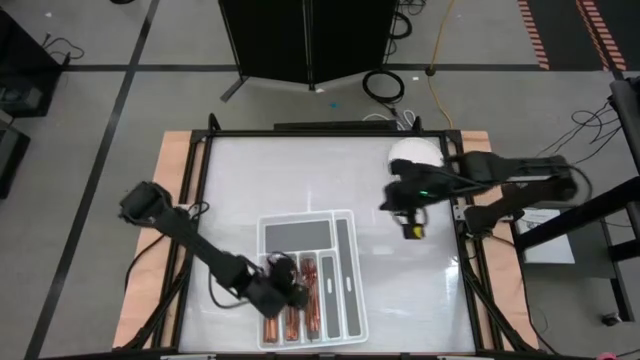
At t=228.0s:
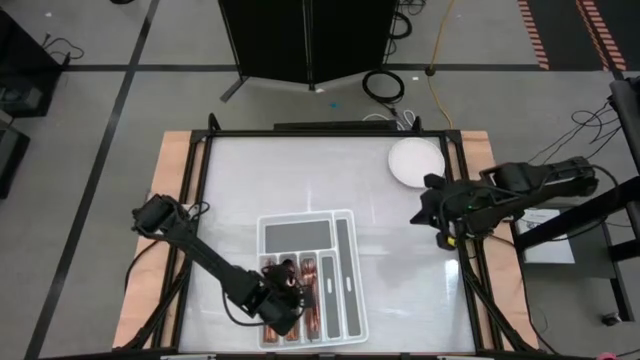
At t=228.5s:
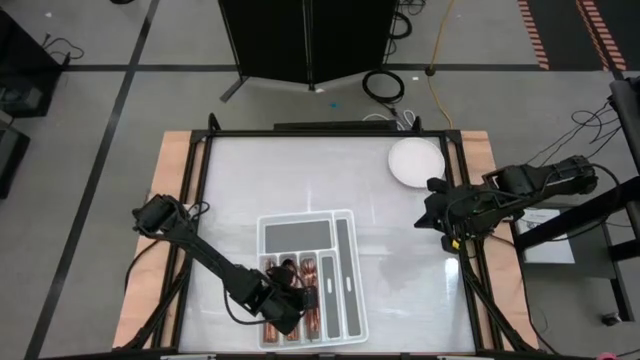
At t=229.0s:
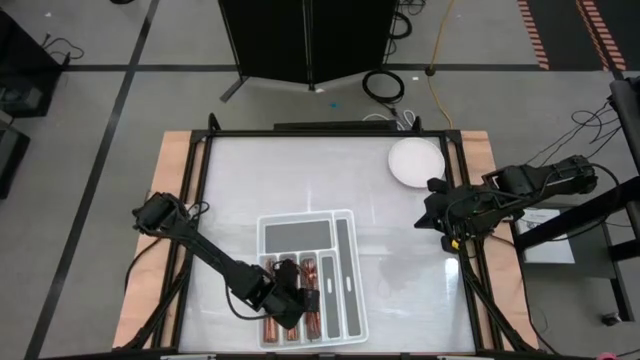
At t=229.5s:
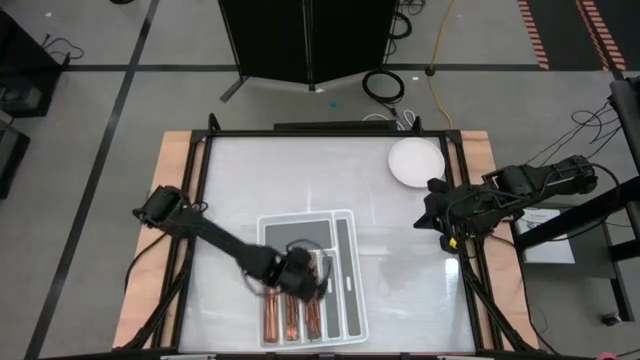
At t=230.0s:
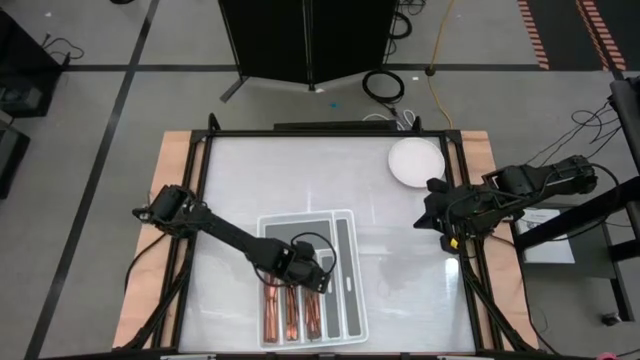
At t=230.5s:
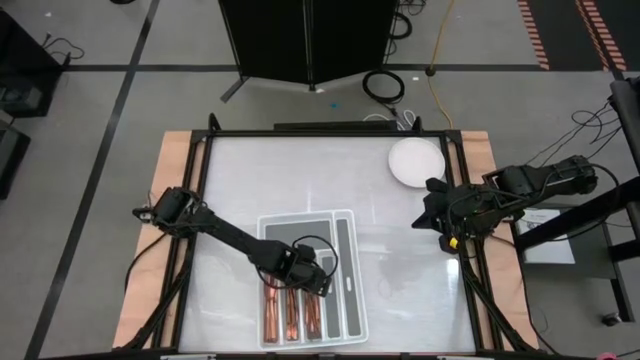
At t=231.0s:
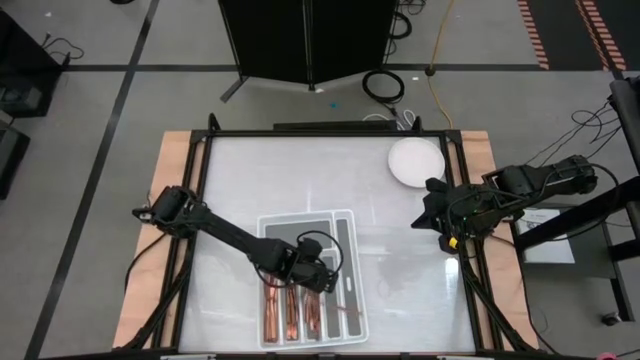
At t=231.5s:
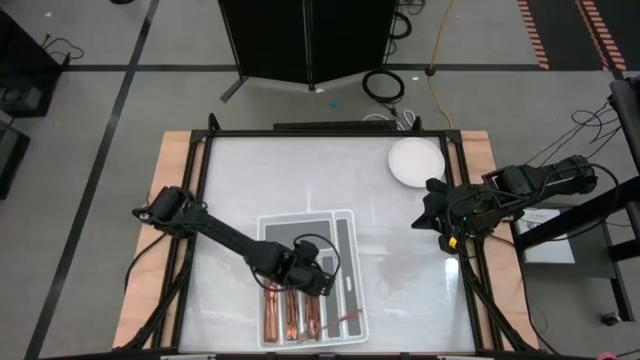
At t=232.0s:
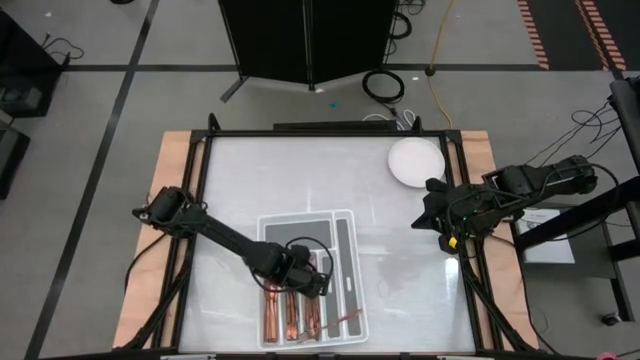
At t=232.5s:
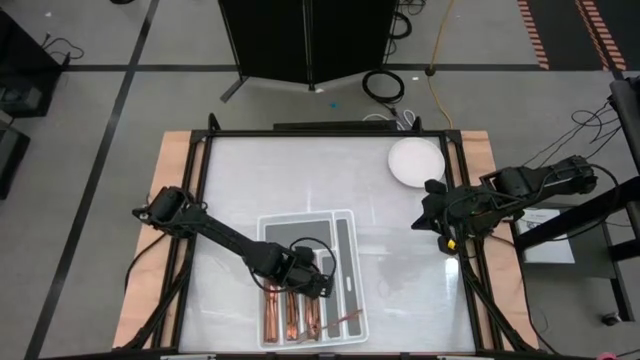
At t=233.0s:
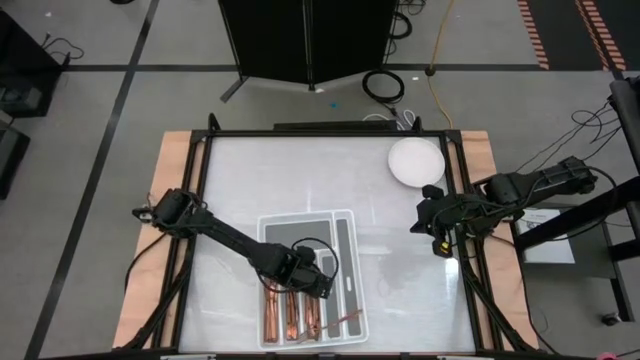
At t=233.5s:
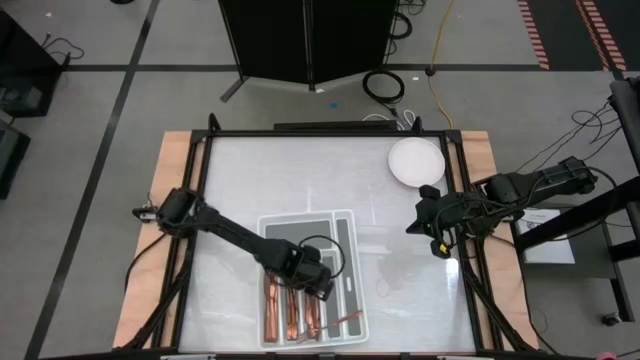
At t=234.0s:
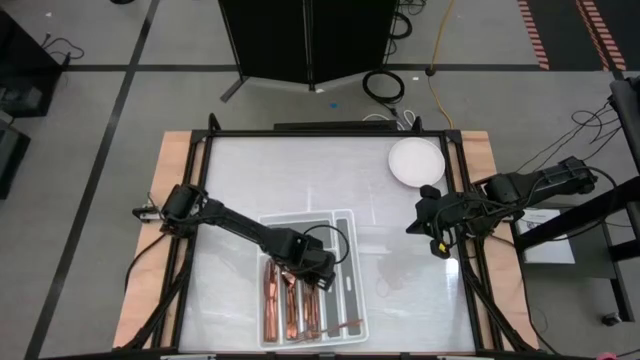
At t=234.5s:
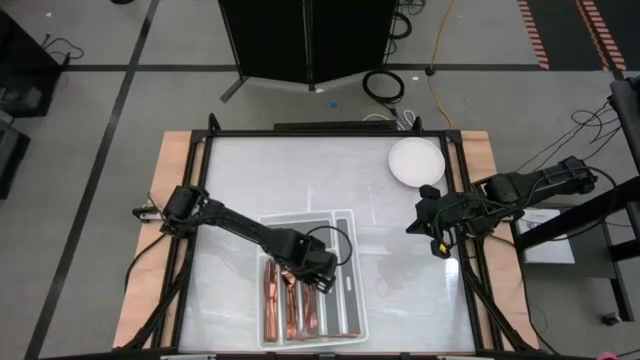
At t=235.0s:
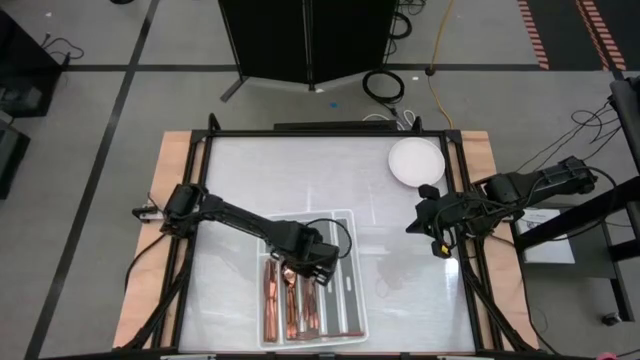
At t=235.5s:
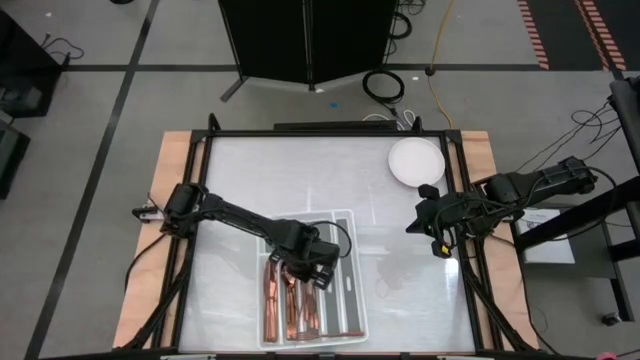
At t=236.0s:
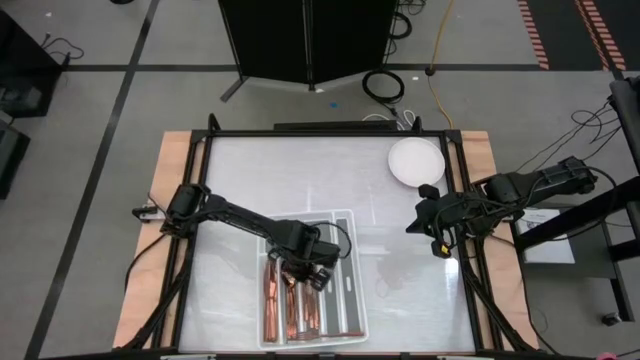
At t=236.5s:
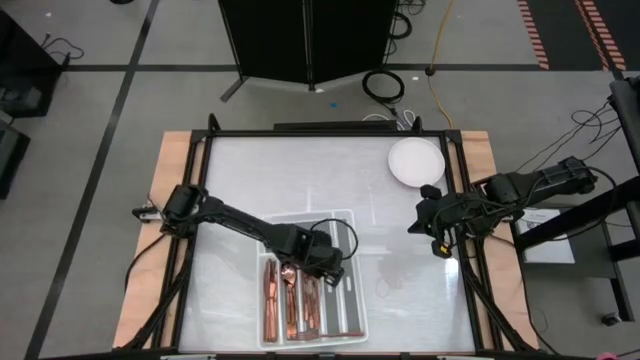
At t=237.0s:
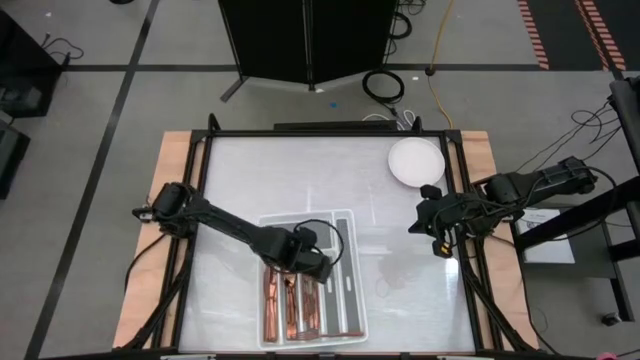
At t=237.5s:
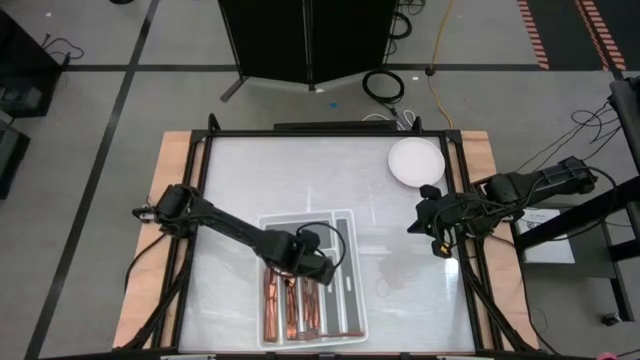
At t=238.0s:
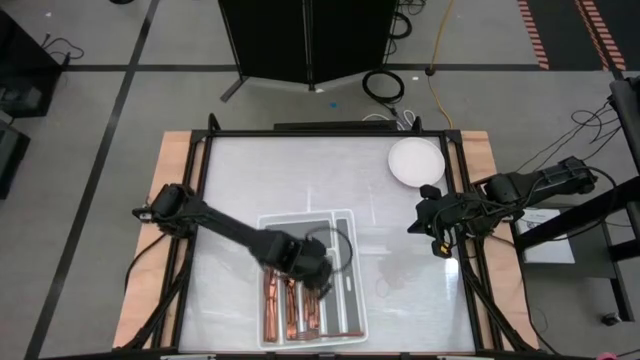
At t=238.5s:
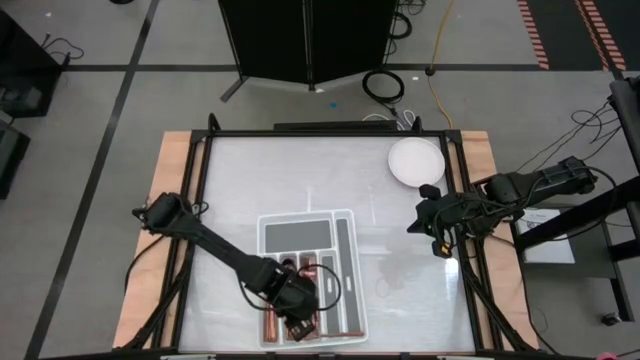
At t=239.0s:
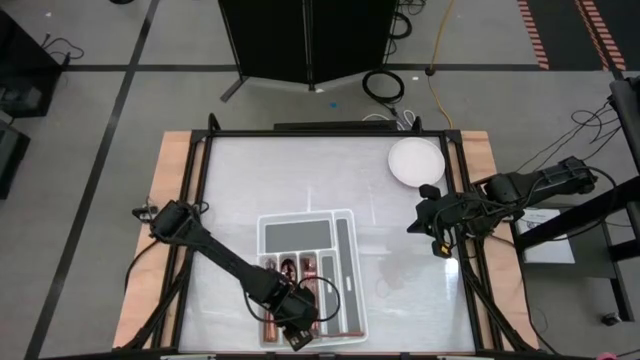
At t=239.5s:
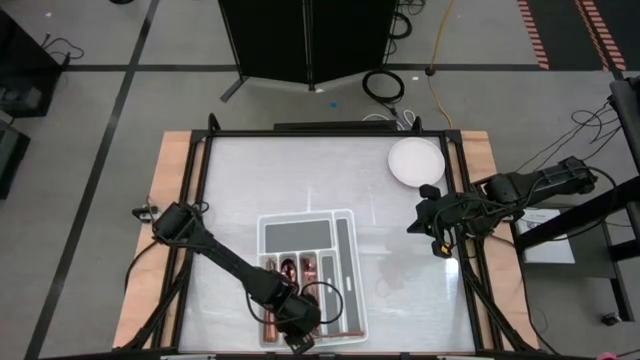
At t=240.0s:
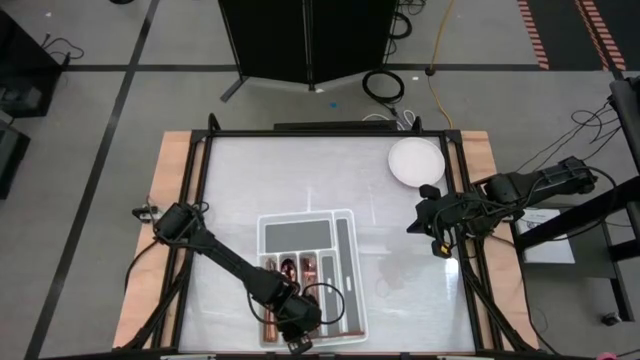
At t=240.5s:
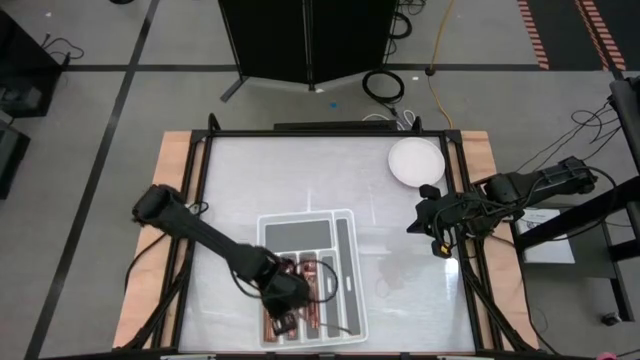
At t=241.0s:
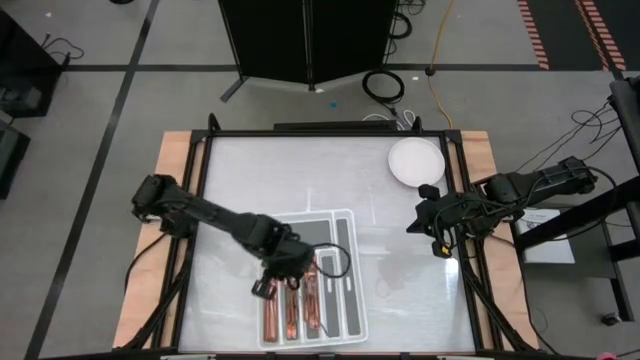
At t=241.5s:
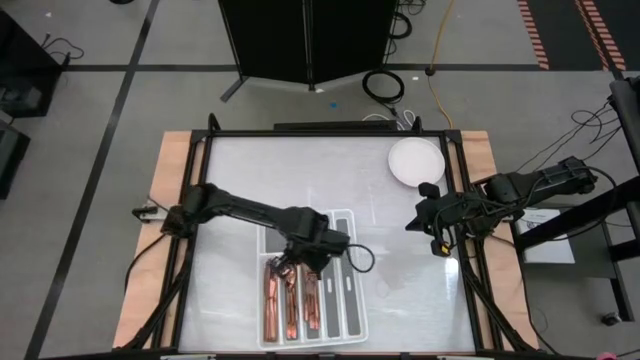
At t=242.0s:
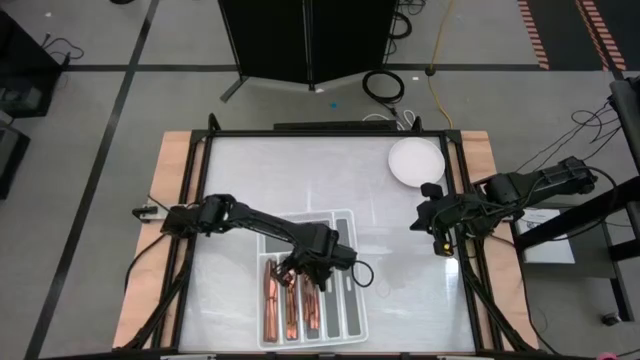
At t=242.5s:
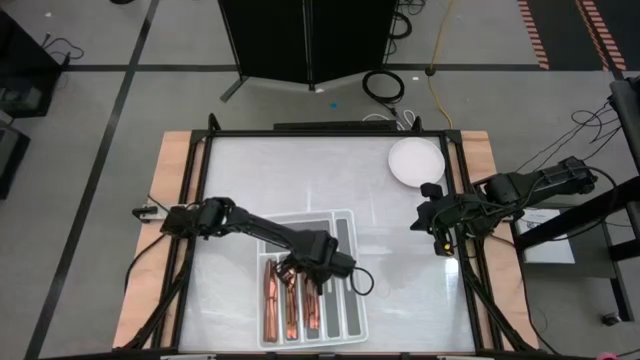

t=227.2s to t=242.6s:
Task: Sort silverware
Put the fork into the silverware tray

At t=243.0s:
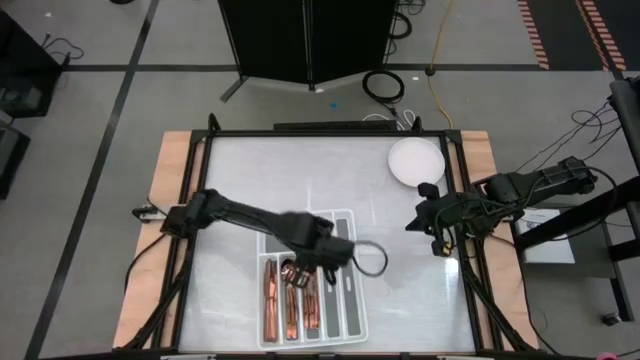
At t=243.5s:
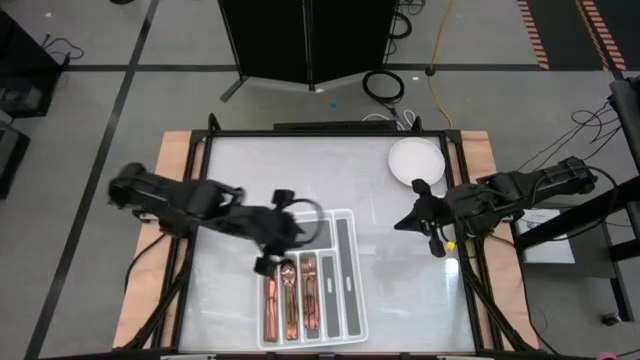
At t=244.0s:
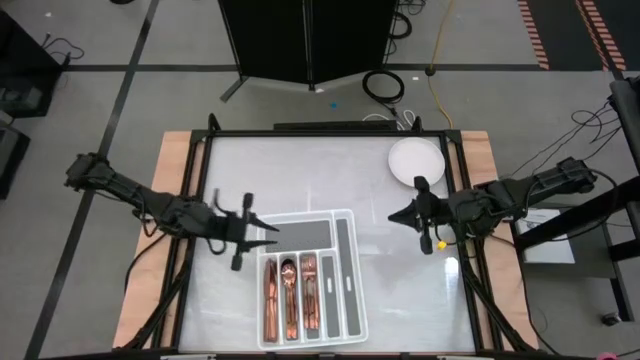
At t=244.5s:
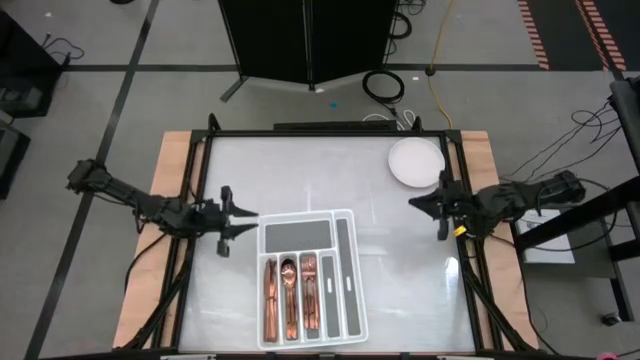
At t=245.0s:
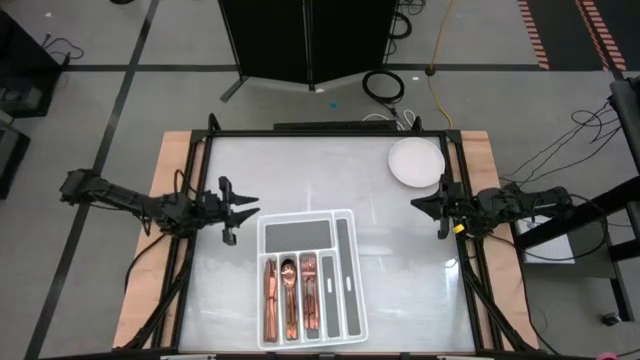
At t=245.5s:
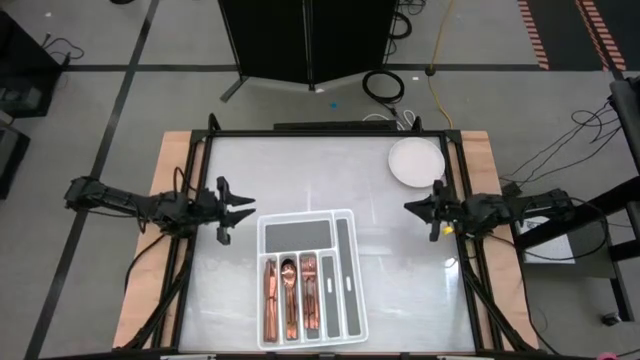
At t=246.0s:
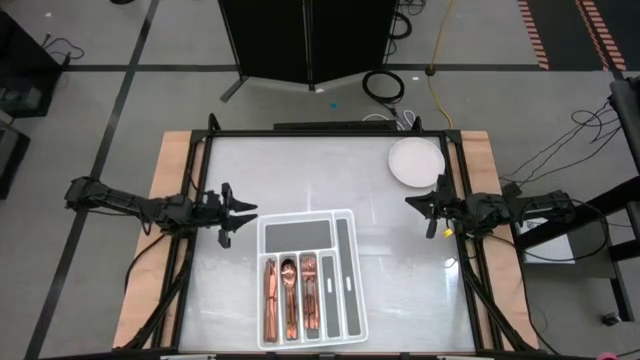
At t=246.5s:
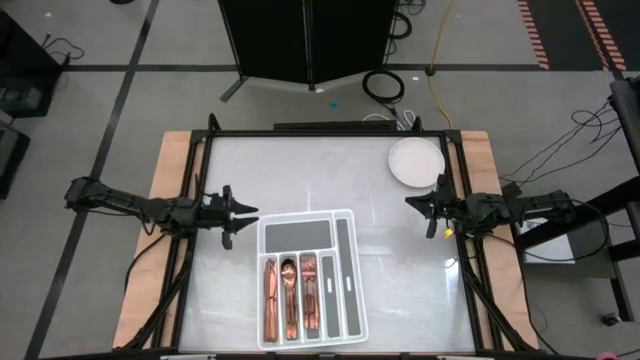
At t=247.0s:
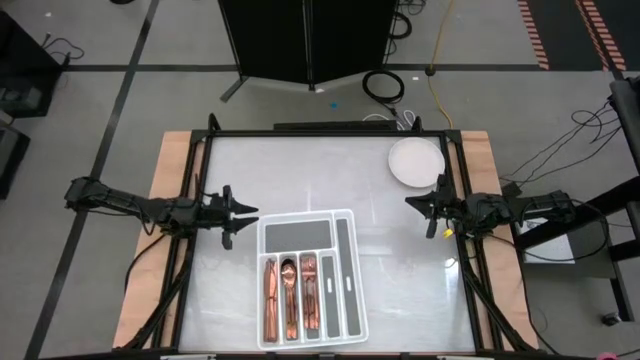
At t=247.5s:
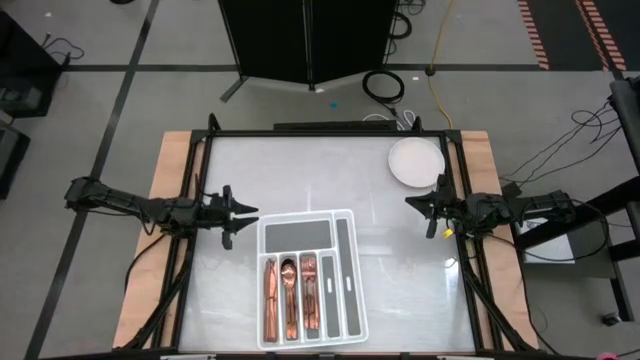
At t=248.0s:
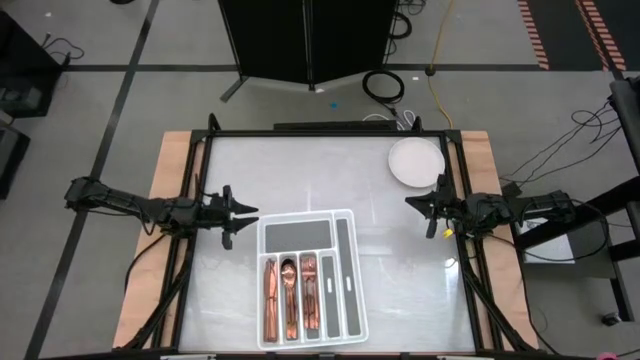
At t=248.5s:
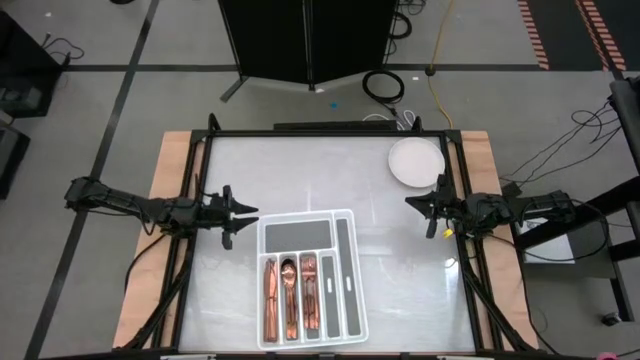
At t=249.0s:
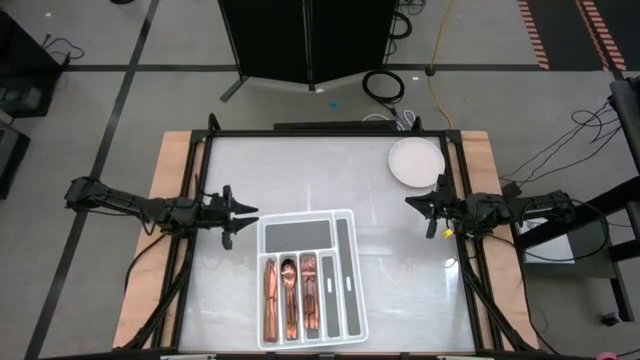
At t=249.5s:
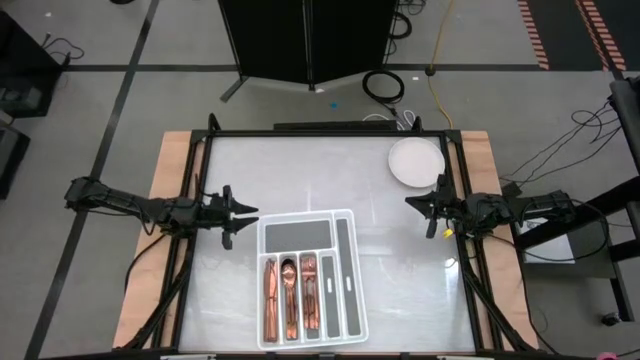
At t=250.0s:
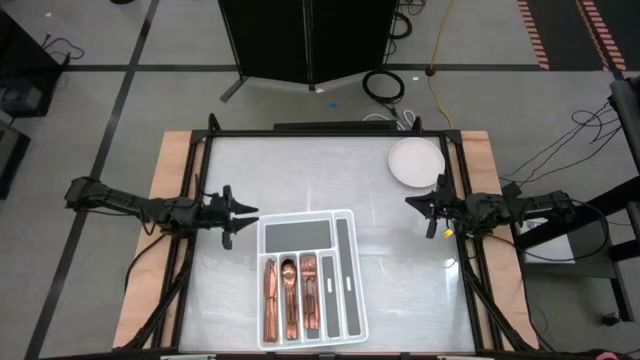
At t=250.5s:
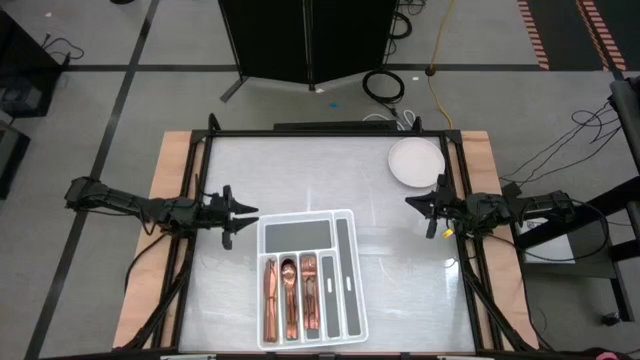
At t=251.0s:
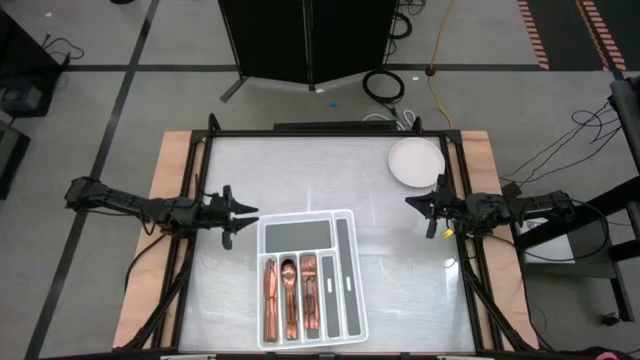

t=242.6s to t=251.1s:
Return to home position
